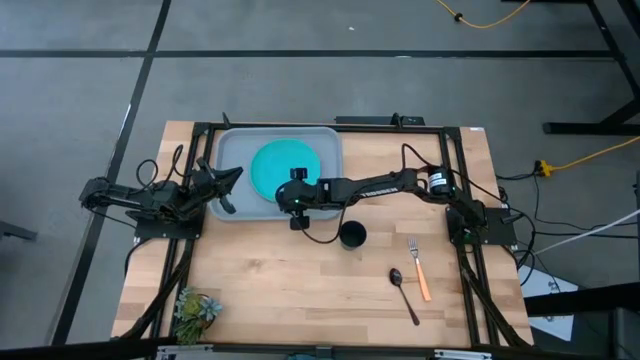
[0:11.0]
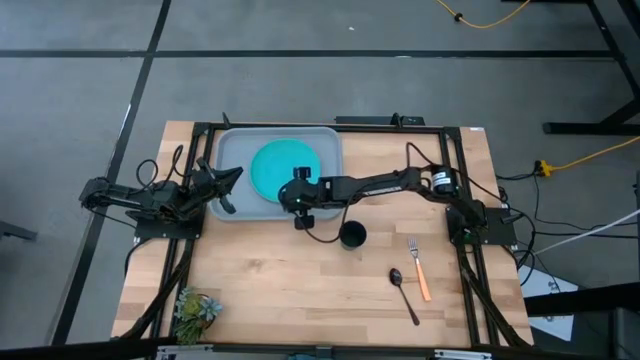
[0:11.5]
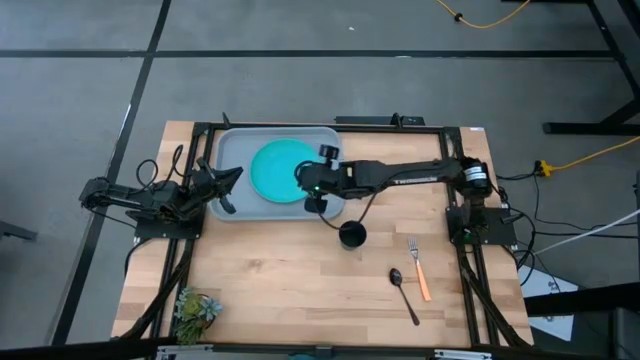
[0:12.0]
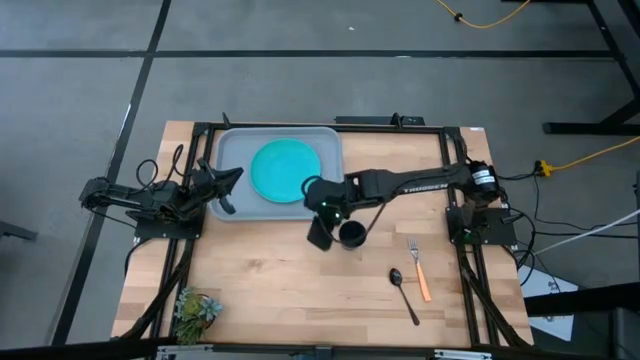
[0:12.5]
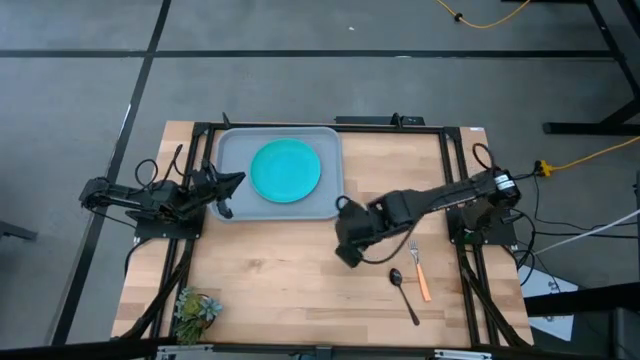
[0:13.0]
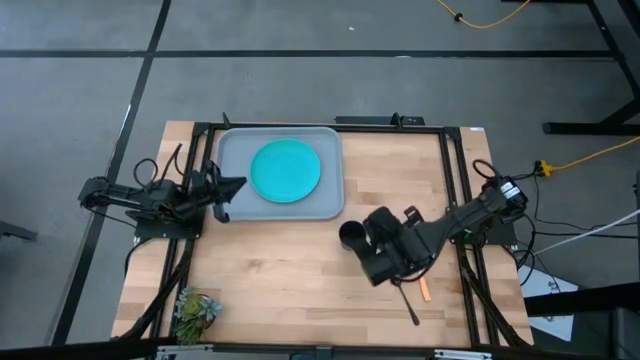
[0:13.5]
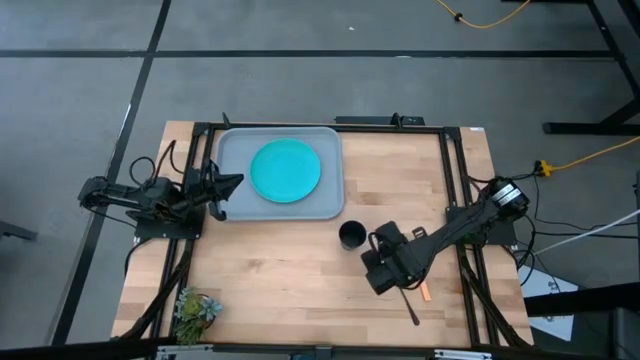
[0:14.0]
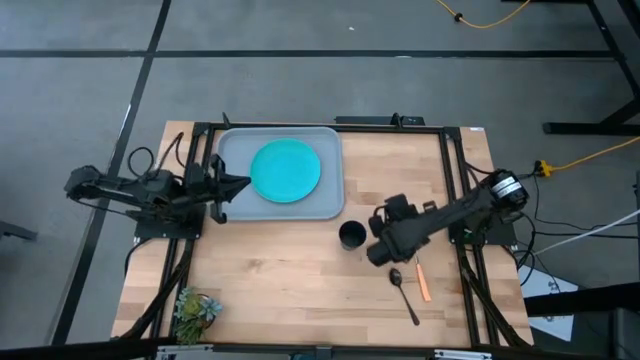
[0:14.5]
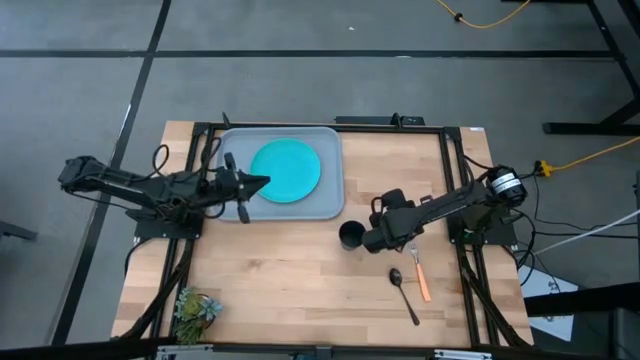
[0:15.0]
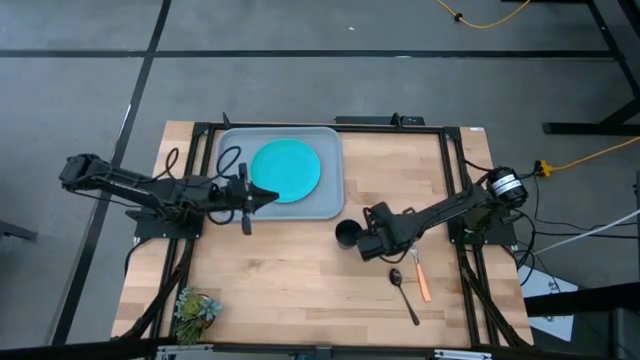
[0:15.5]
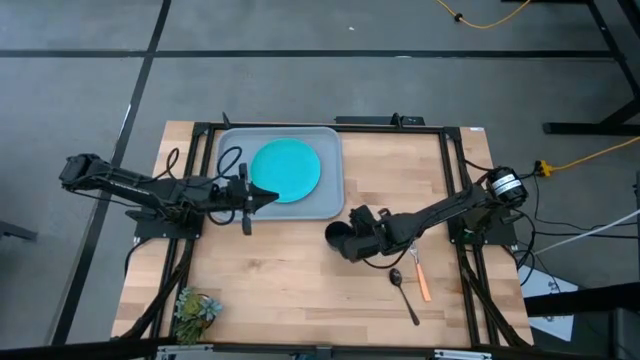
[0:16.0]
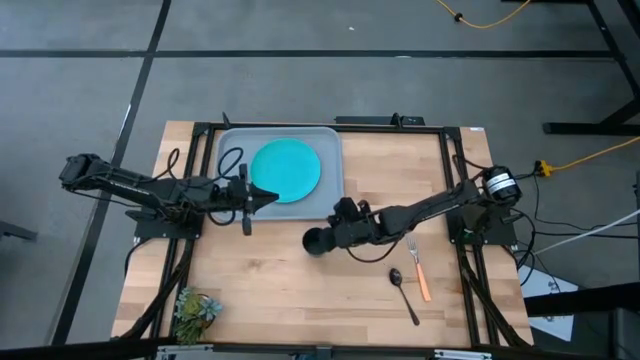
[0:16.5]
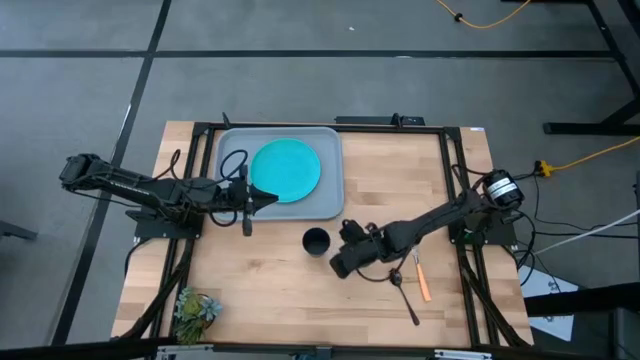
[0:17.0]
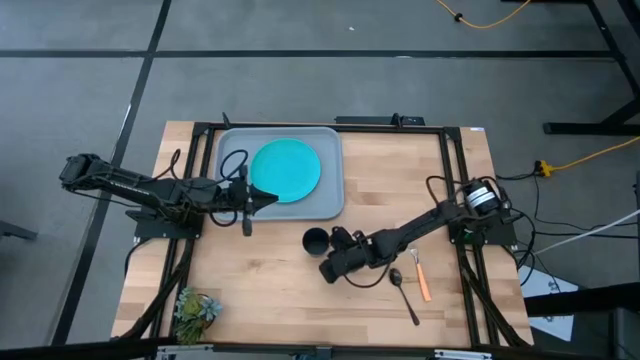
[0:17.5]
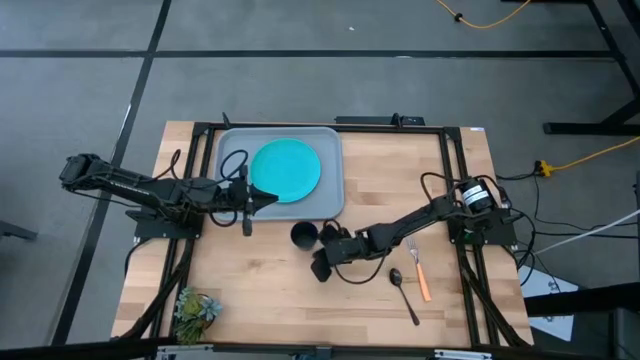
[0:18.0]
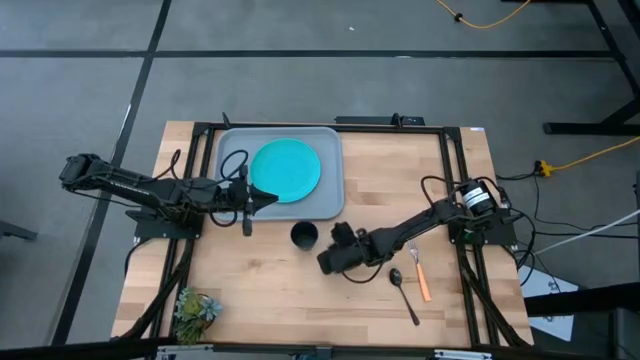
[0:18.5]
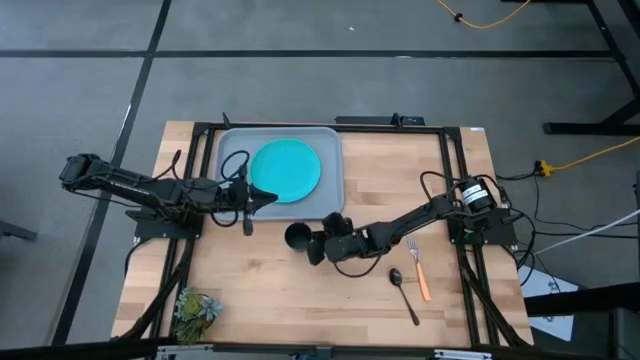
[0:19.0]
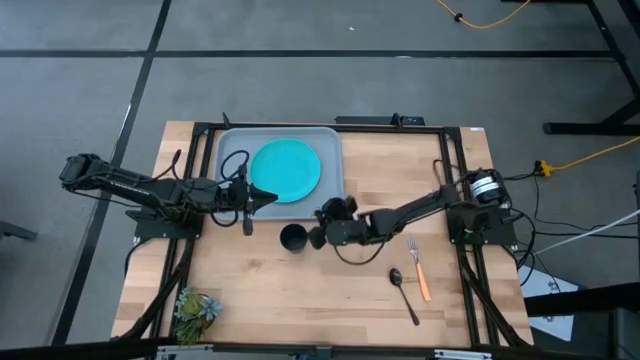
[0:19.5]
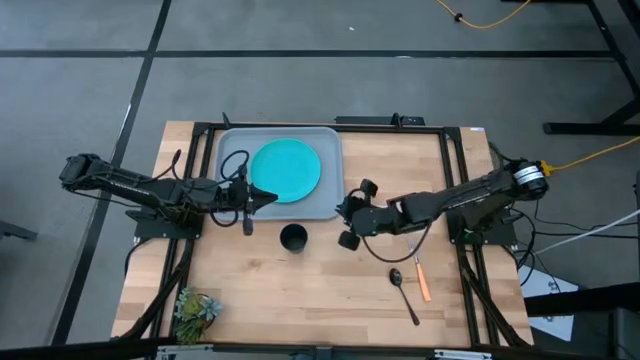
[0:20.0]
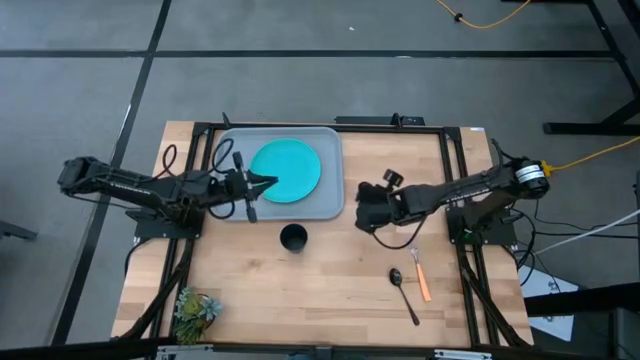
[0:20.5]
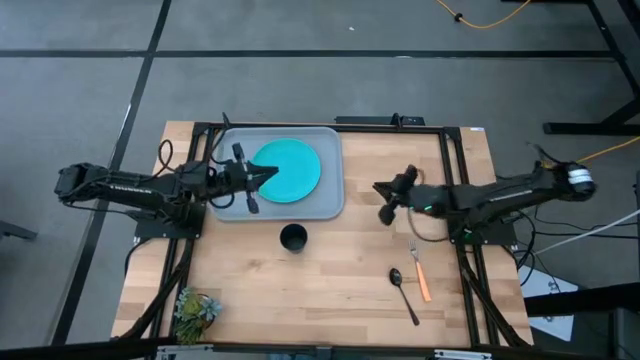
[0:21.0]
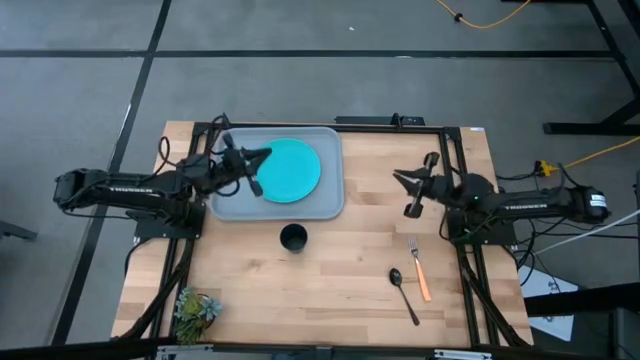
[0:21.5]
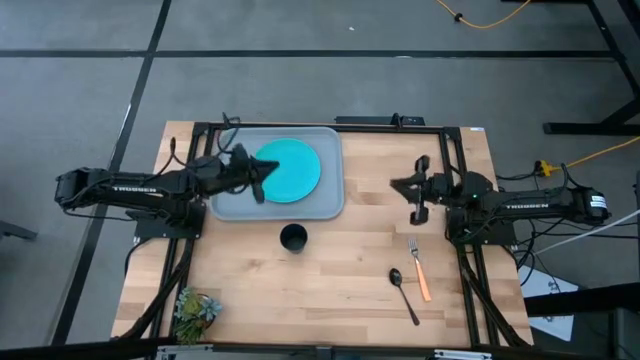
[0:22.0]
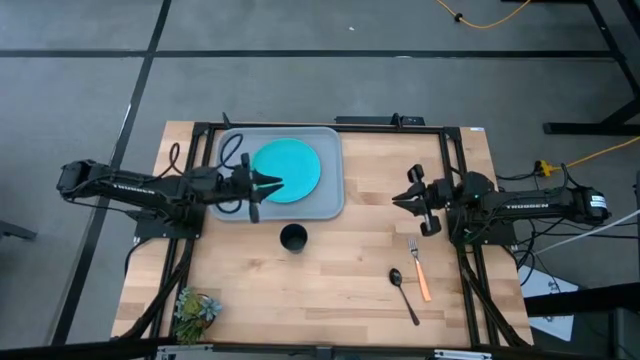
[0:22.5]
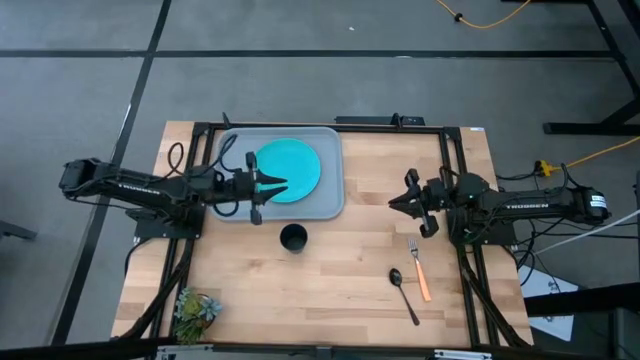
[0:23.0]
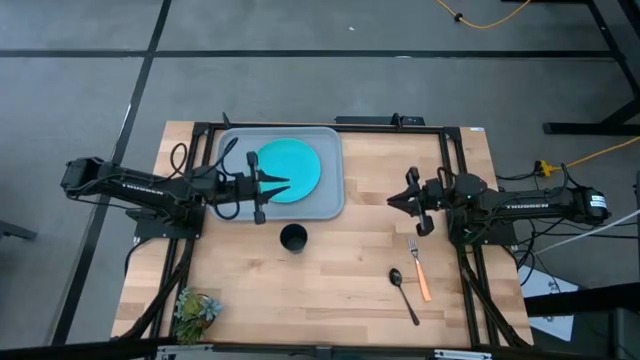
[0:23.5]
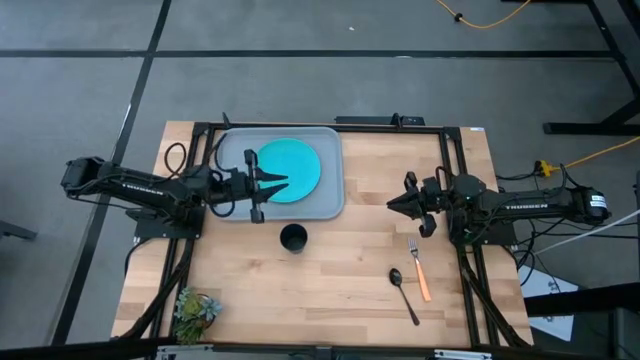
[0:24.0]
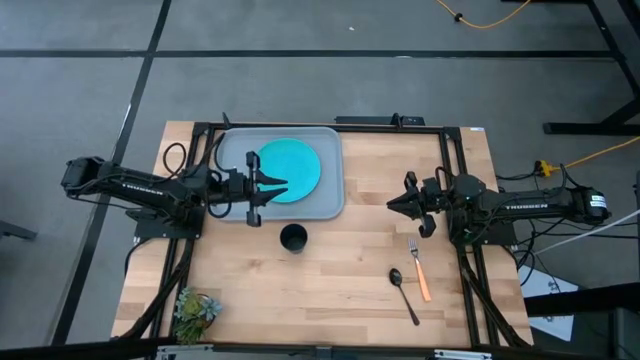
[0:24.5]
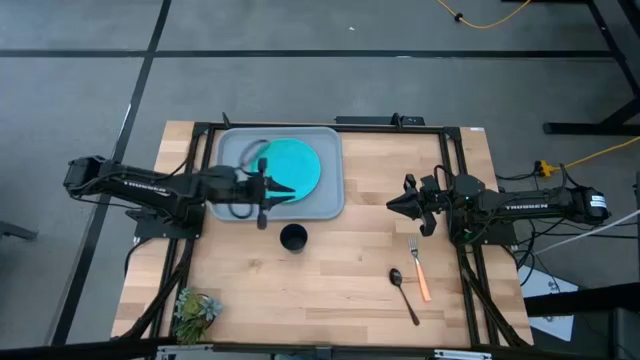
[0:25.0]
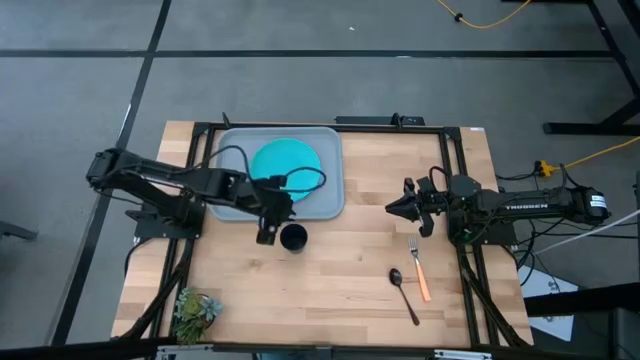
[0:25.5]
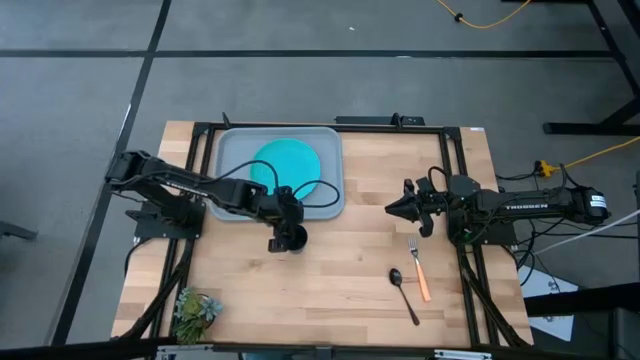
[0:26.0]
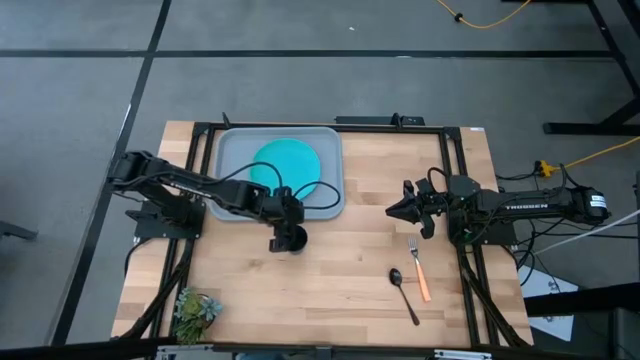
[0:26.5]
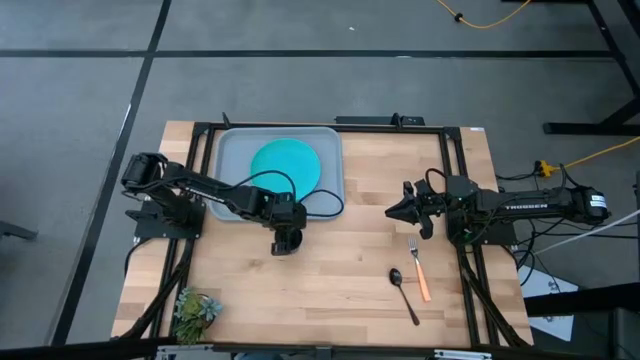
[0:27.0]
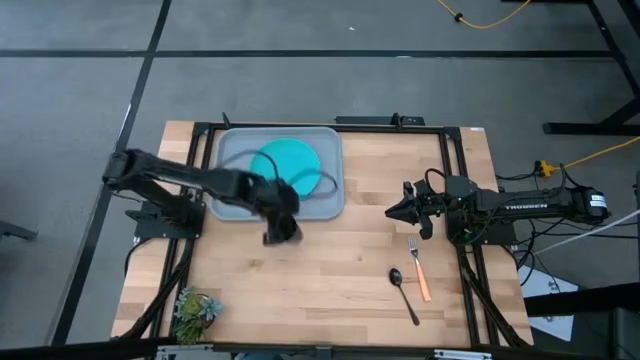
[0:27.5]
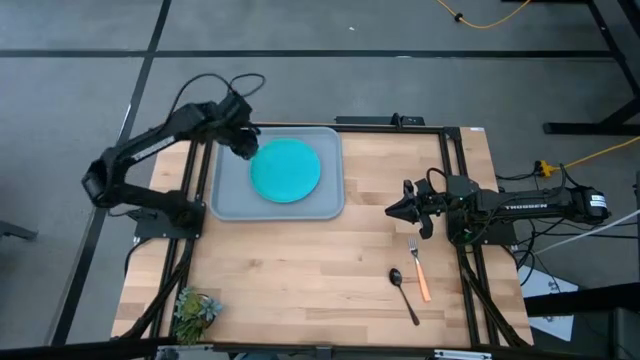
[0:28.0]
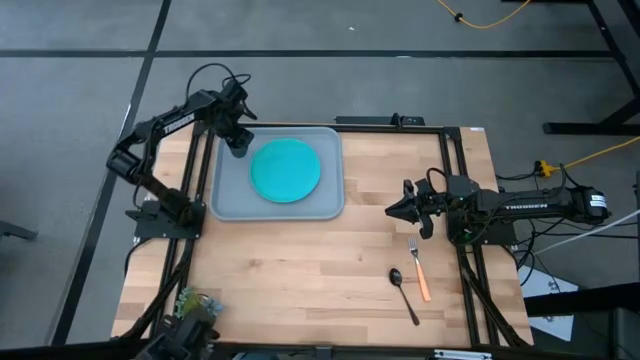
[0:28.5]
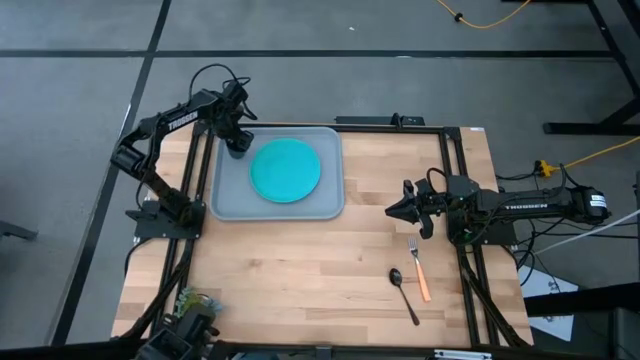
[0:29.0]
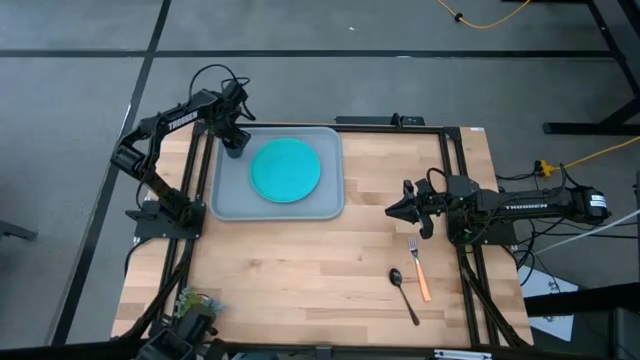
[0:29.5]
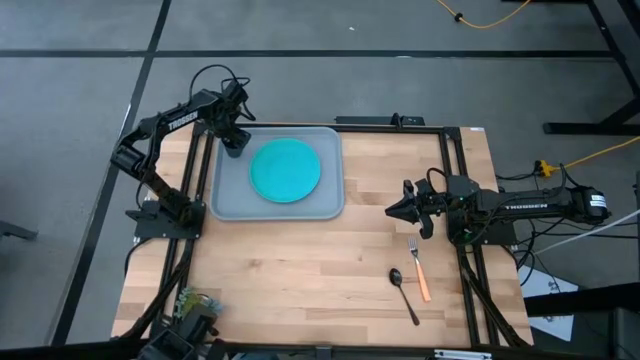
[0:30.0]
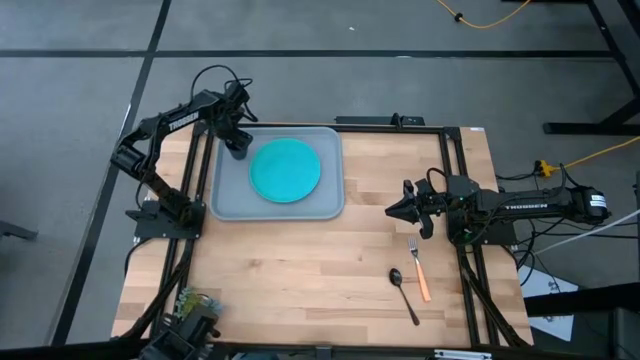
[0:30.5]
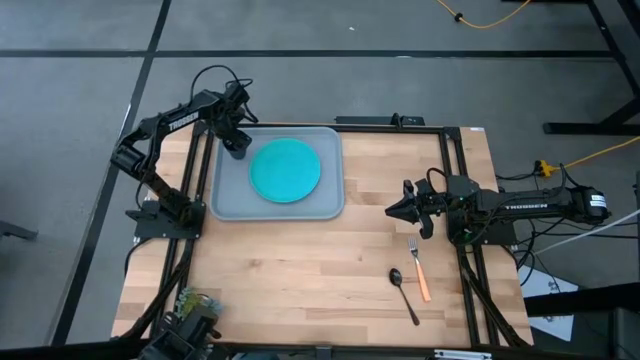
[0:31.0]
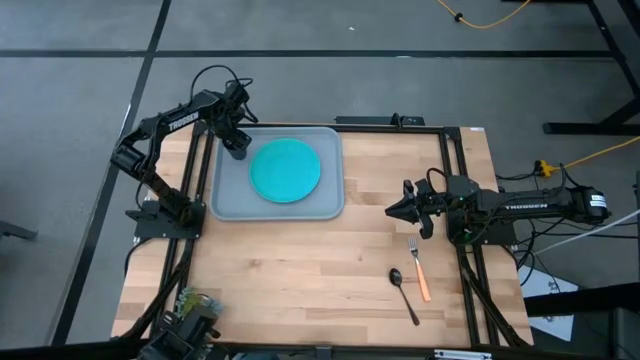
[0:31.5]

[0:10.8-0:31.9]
Task: Pick and place plate/cup/fork/spoon on tray
Put the black cup on the serving tray to the top left of the blue plate
